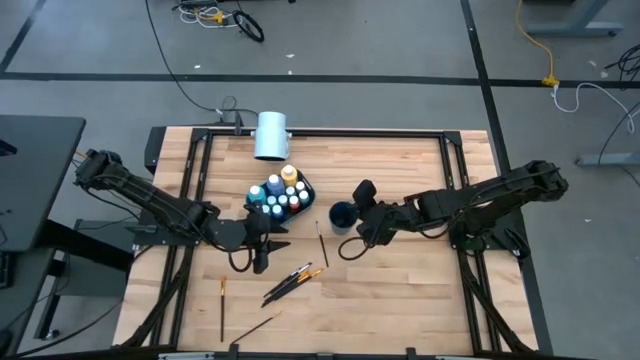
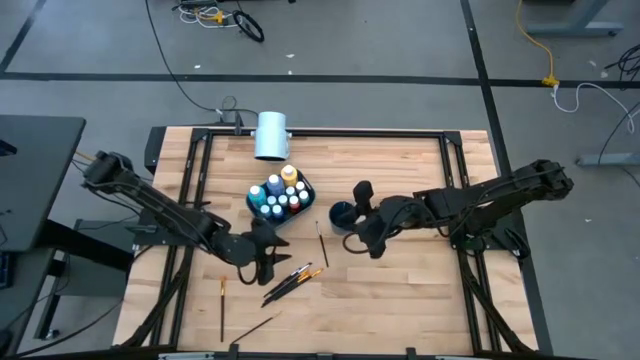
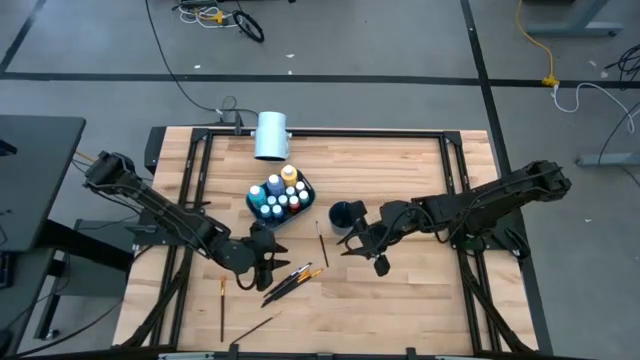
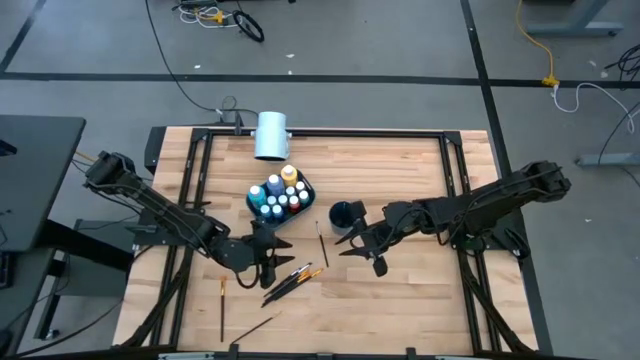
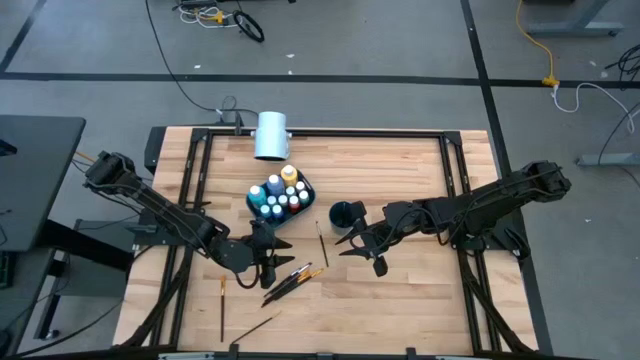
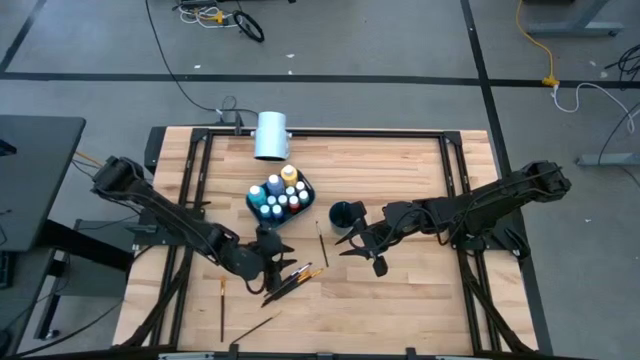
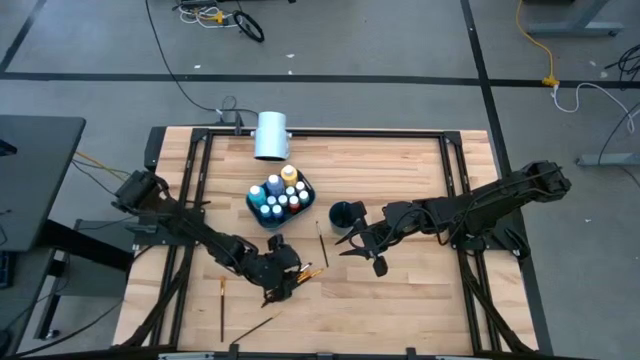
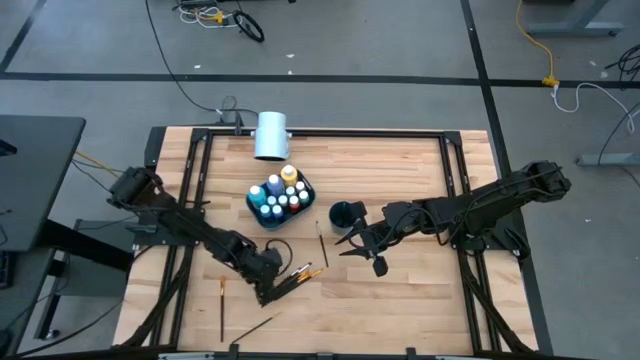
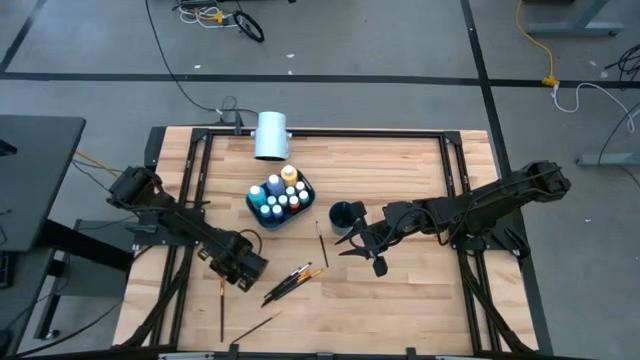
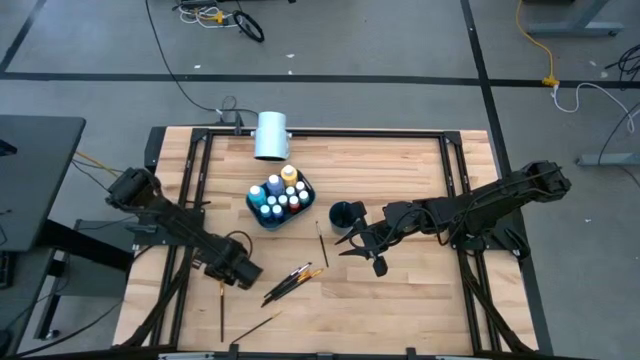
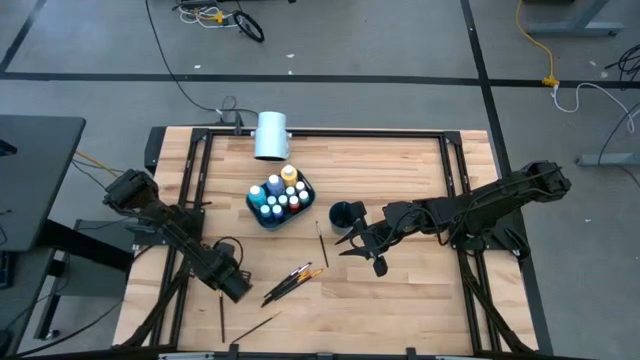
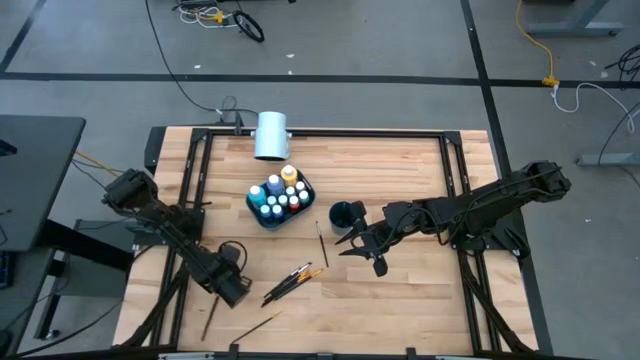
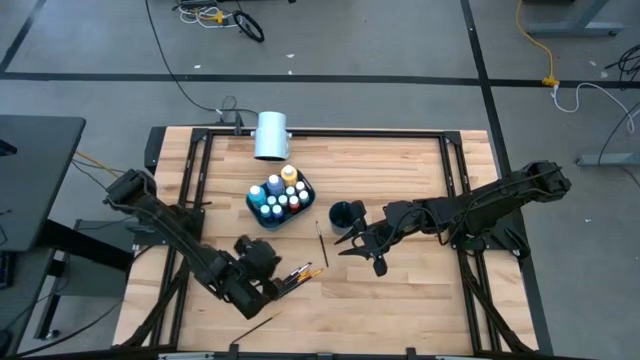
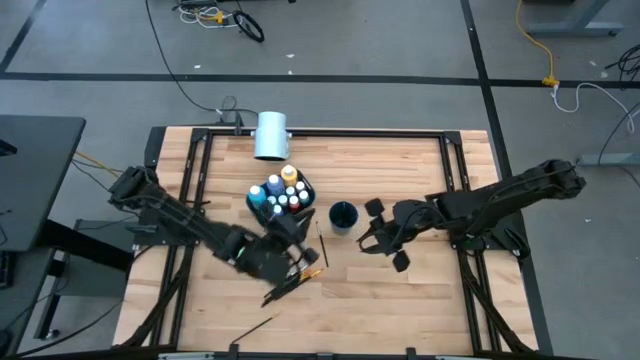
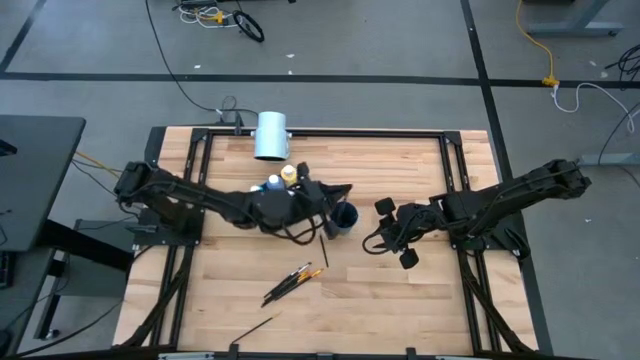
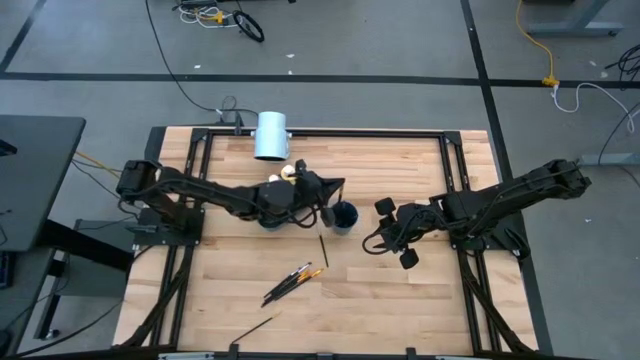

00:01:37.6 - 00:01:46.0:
Task: Pick & Place Paint Supplies
Put the gold paint brush into the blue cup

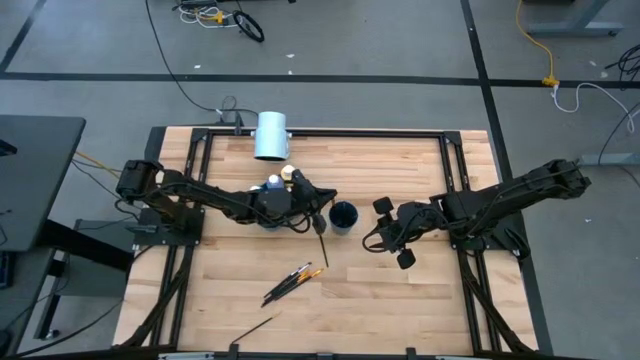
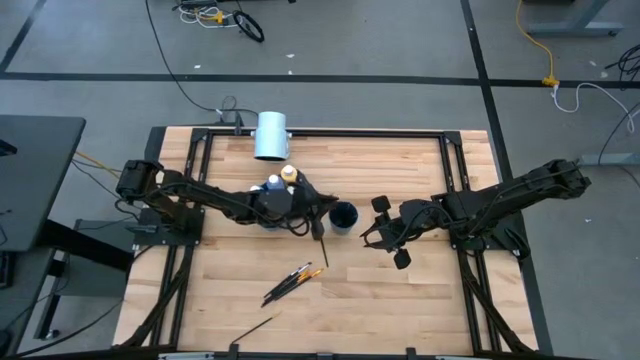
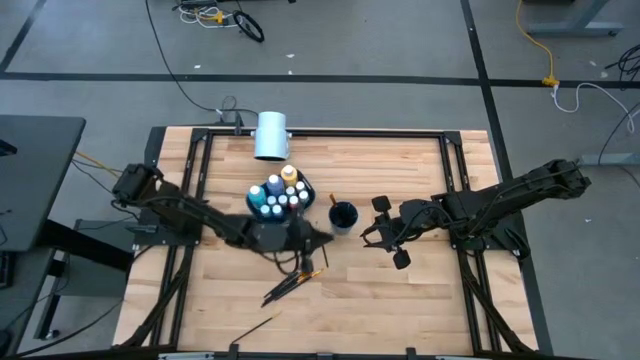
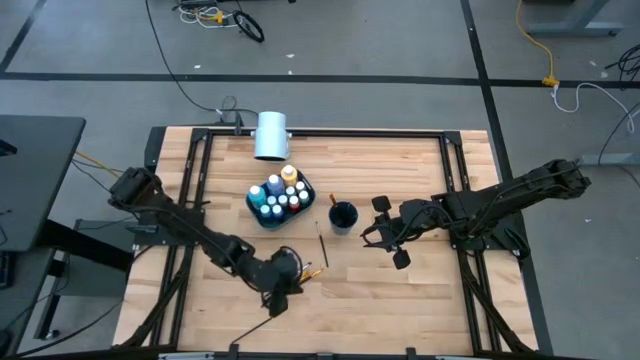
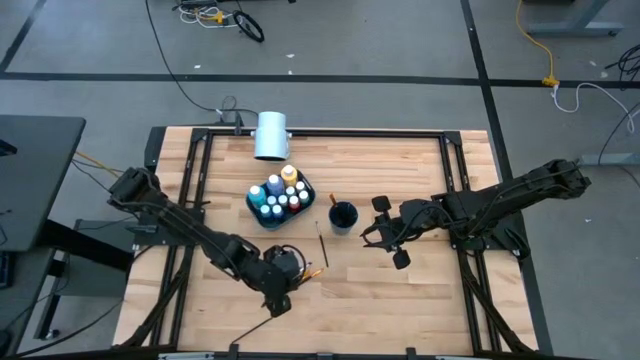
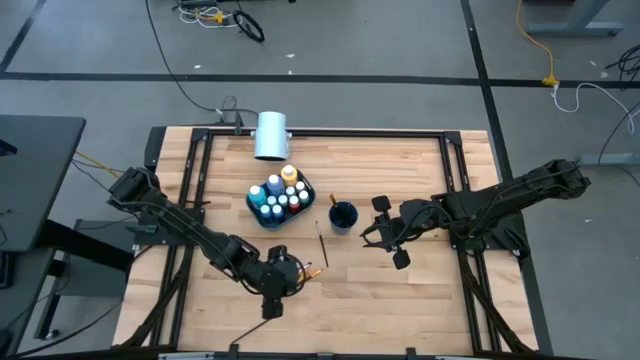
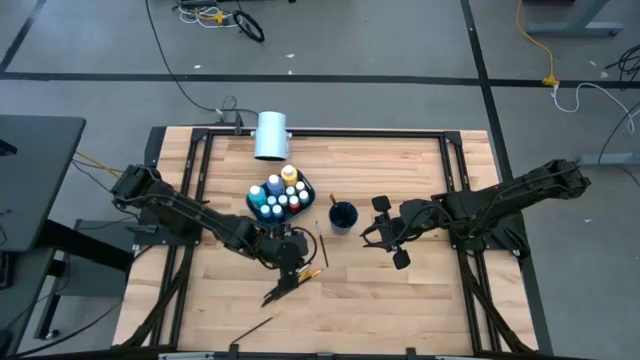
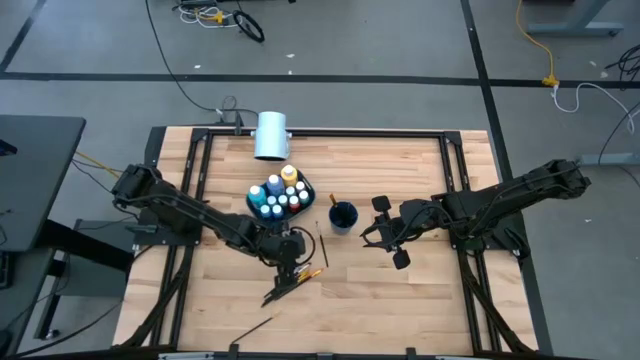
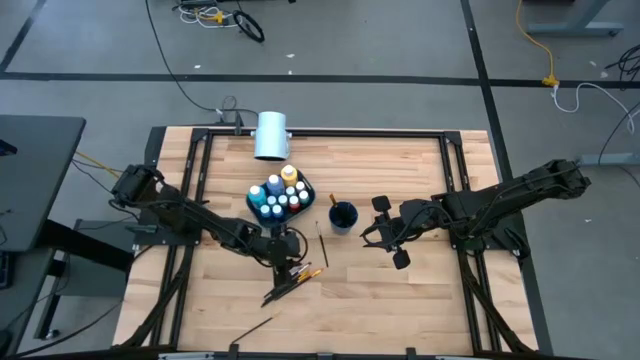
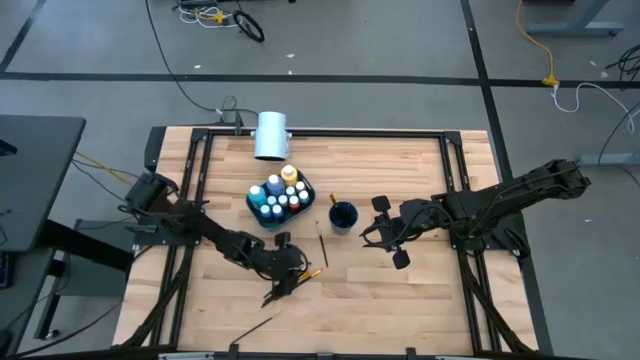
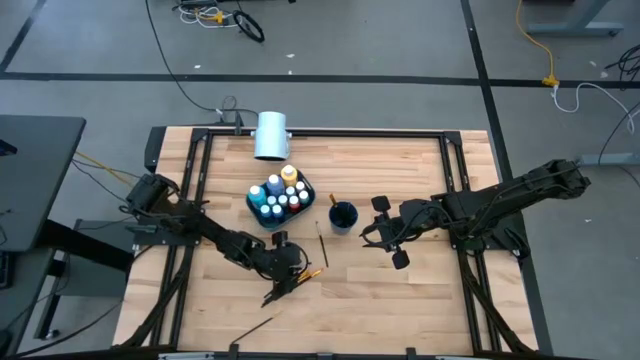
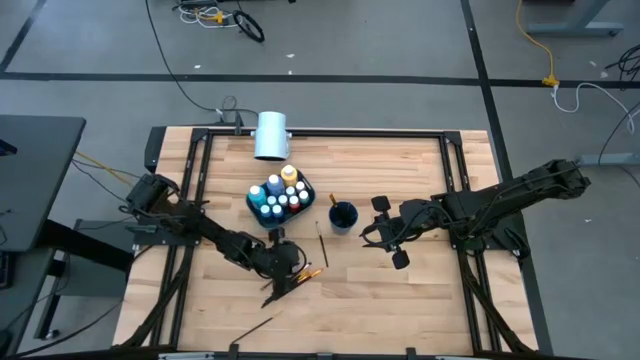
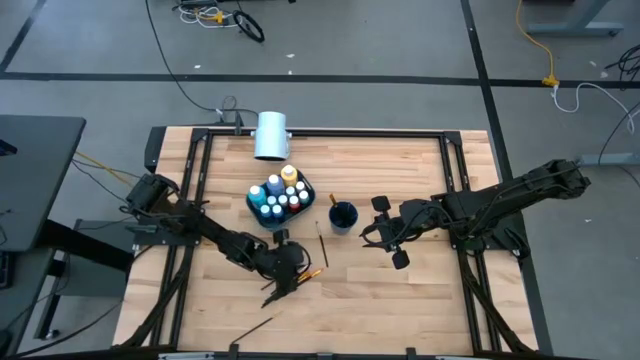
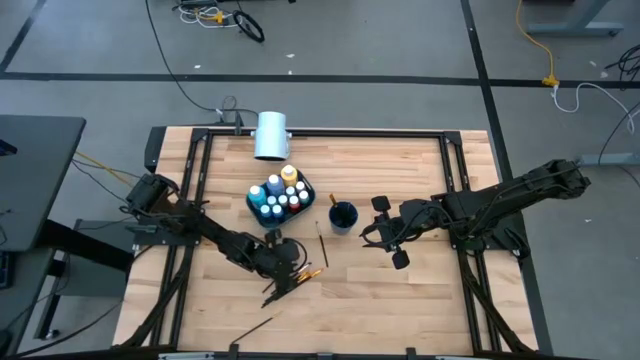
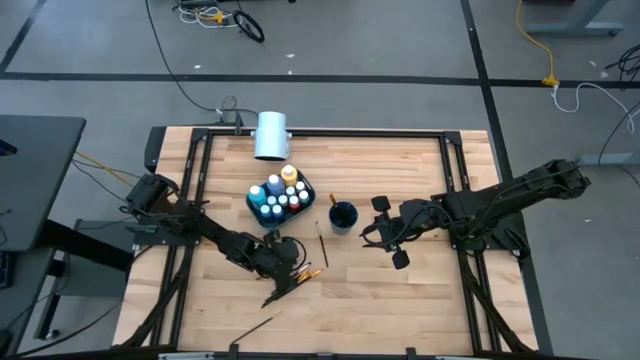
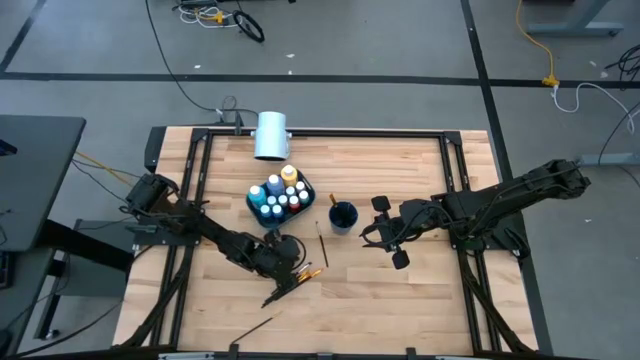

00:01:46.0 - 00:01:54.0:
Put the silver paint brush into the blue cup

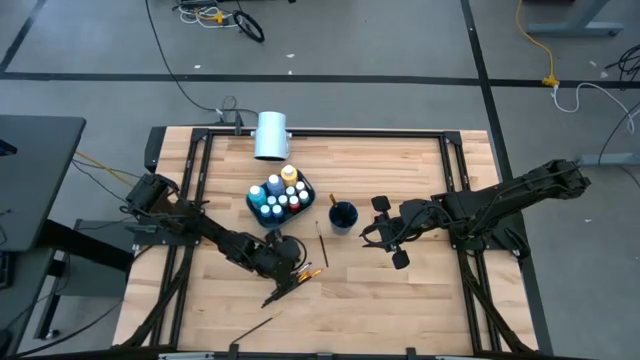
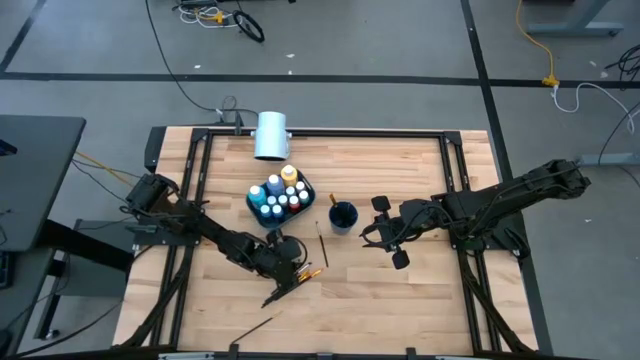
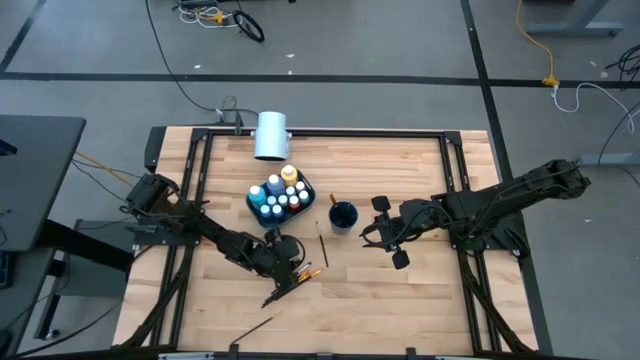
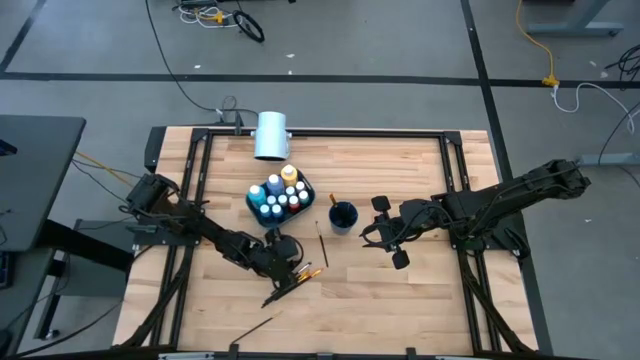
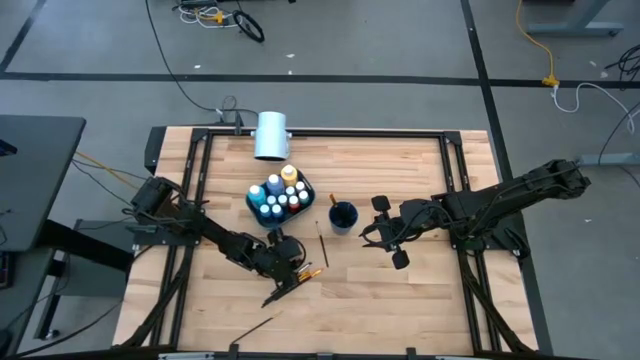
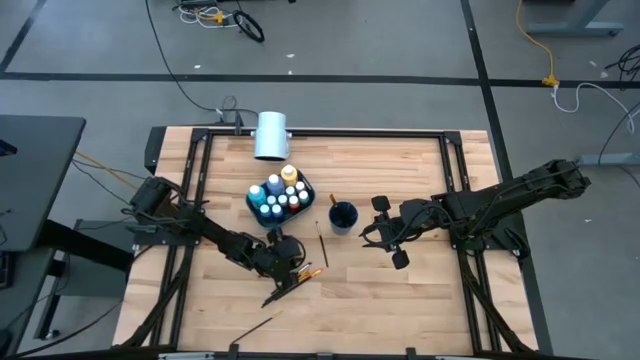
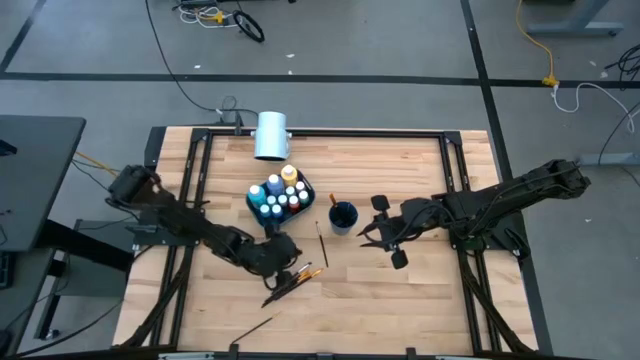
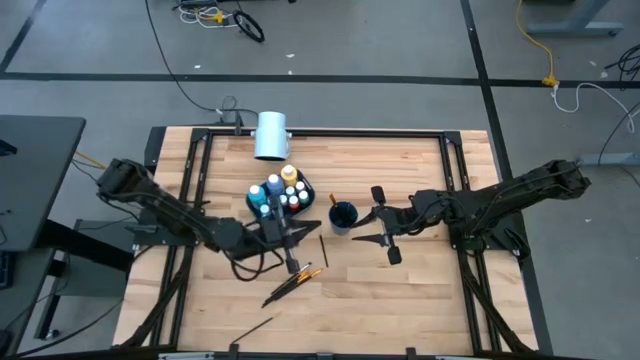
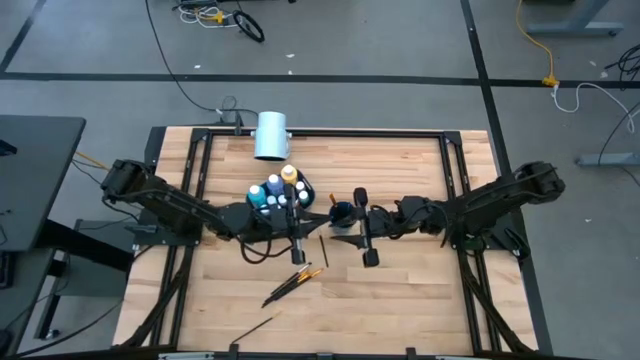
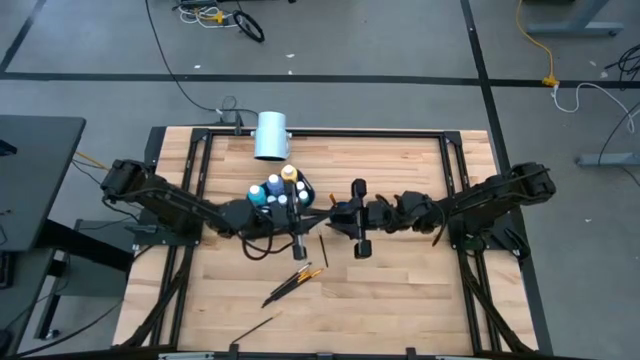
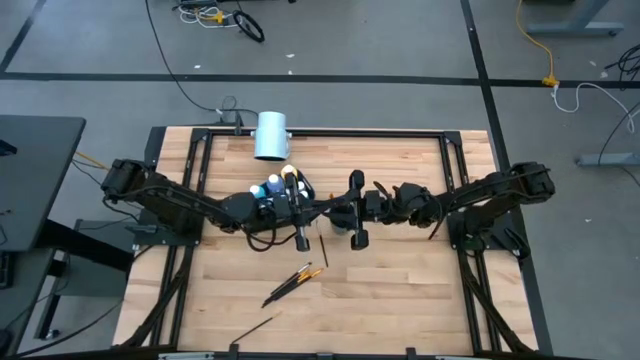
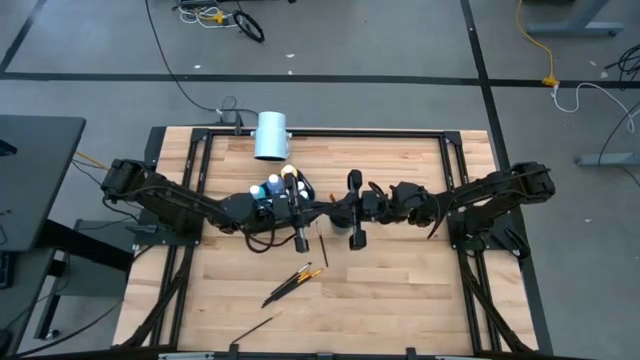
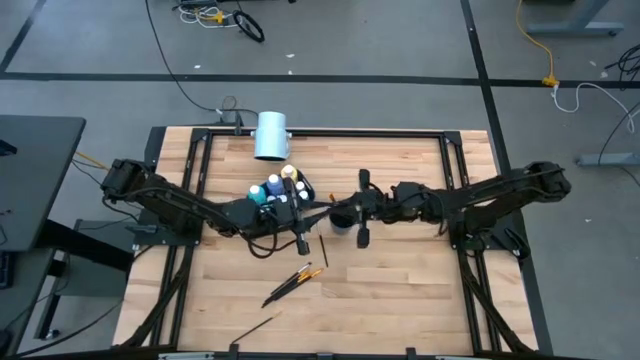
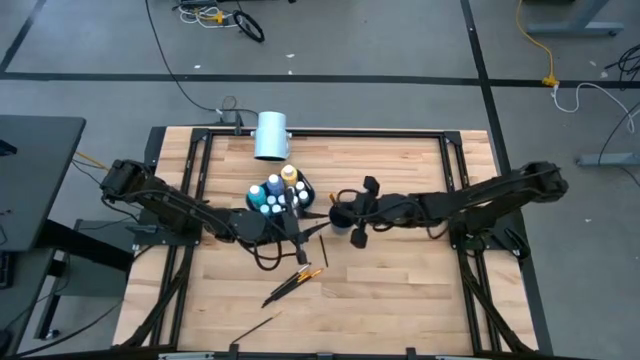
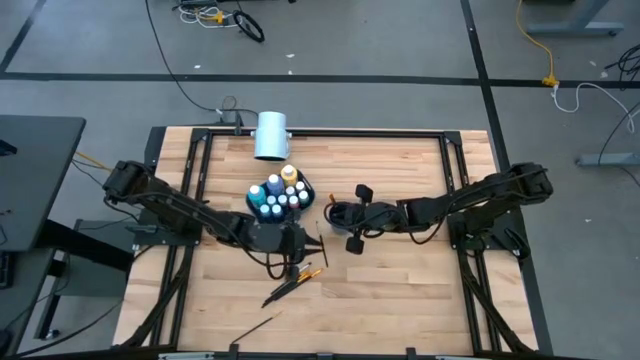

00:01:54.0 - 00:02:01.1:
Put the silver paint brush into the blue cup
